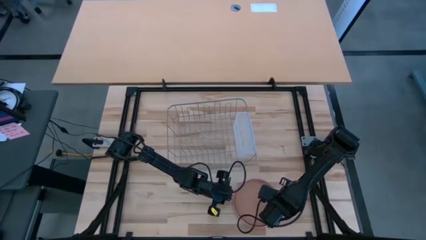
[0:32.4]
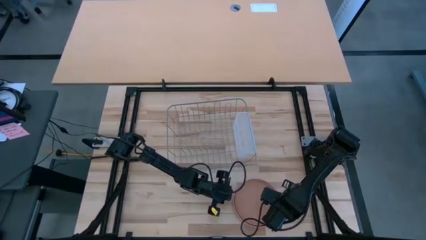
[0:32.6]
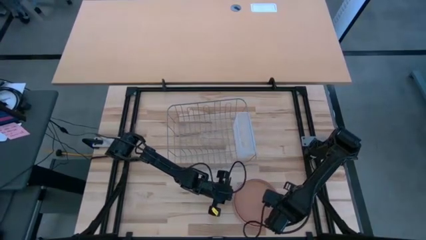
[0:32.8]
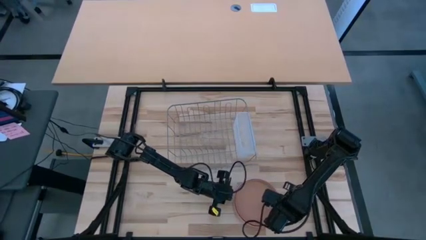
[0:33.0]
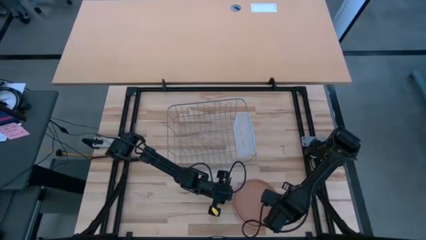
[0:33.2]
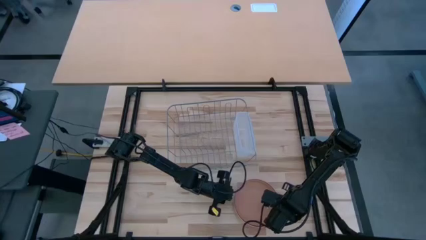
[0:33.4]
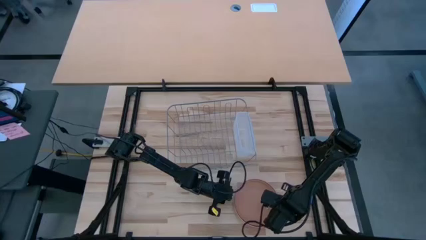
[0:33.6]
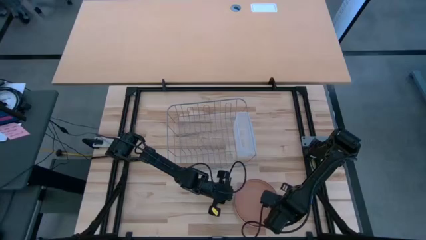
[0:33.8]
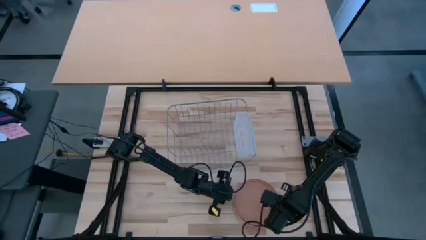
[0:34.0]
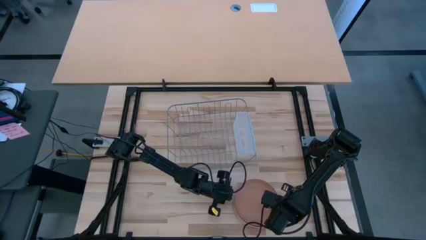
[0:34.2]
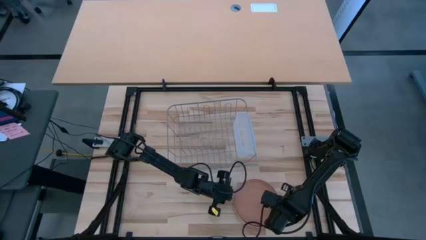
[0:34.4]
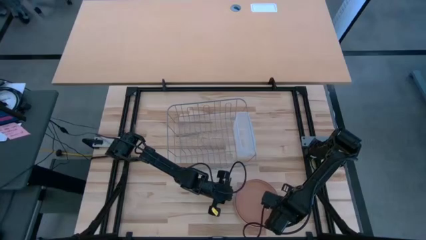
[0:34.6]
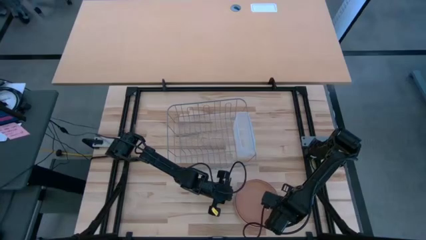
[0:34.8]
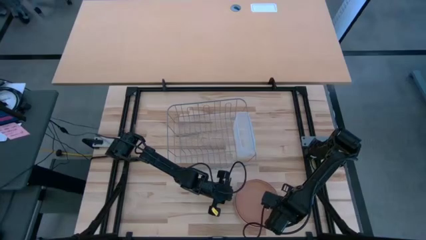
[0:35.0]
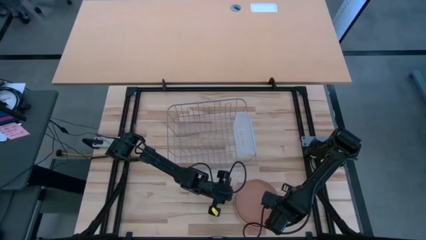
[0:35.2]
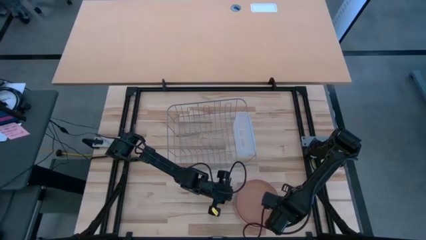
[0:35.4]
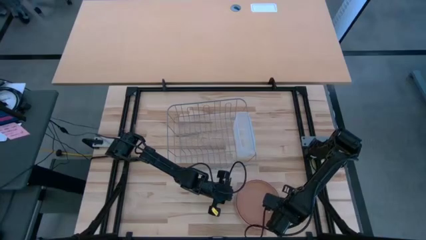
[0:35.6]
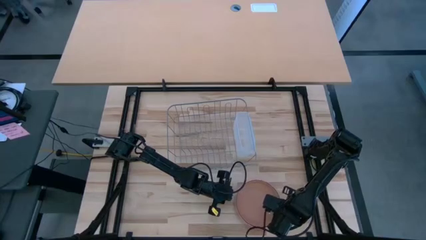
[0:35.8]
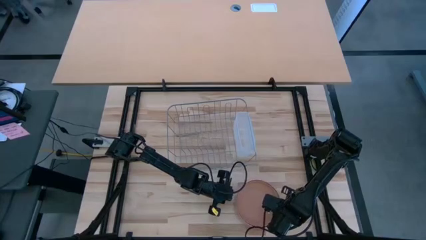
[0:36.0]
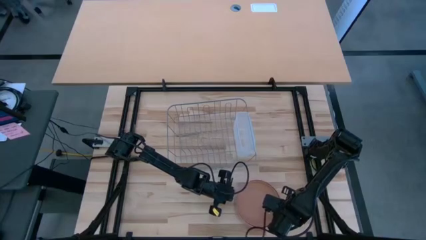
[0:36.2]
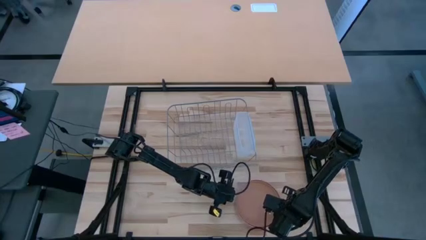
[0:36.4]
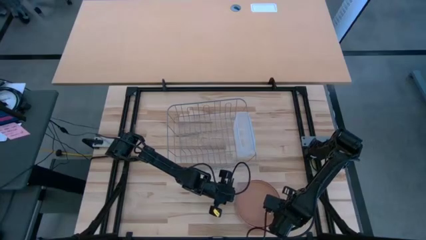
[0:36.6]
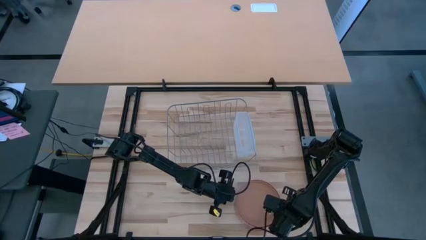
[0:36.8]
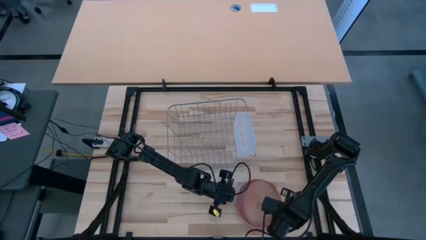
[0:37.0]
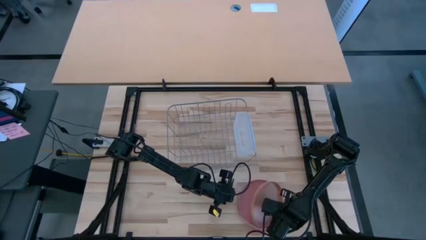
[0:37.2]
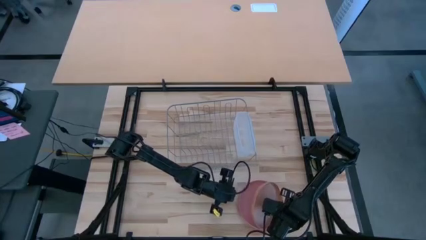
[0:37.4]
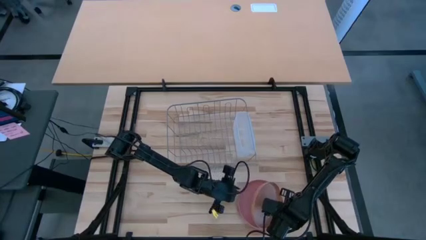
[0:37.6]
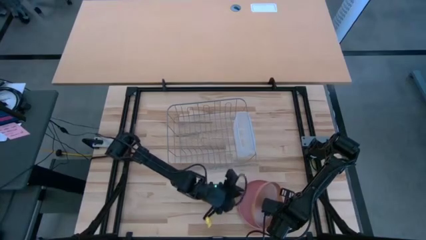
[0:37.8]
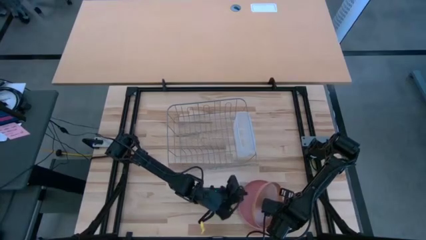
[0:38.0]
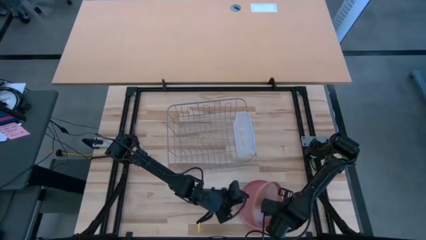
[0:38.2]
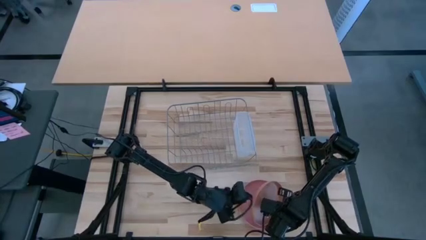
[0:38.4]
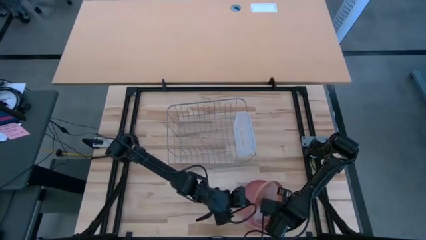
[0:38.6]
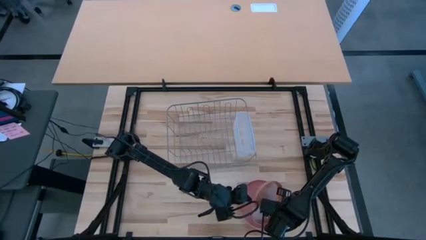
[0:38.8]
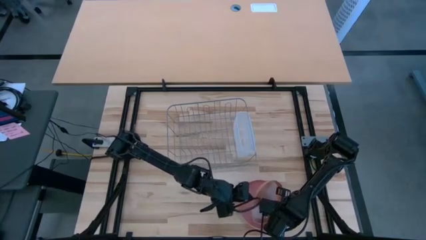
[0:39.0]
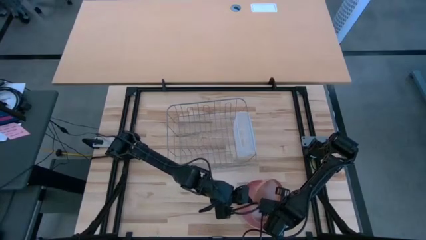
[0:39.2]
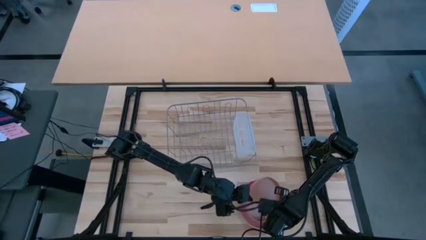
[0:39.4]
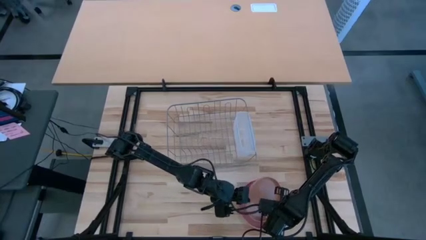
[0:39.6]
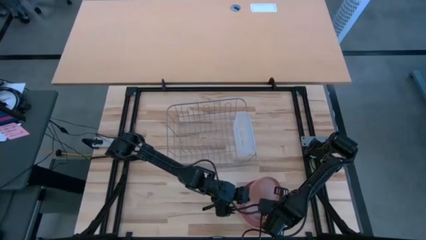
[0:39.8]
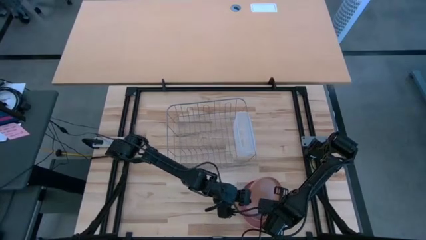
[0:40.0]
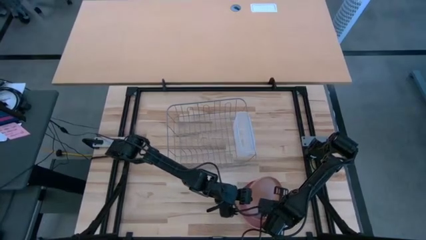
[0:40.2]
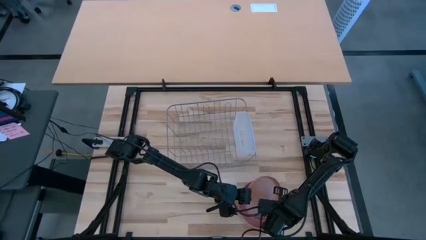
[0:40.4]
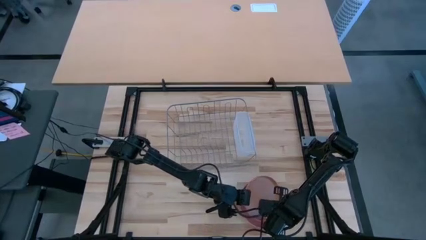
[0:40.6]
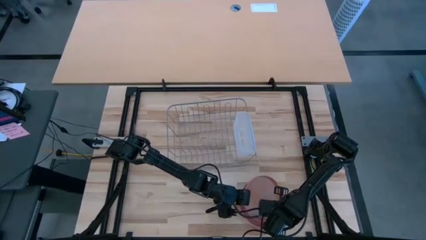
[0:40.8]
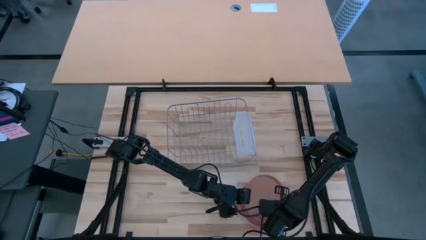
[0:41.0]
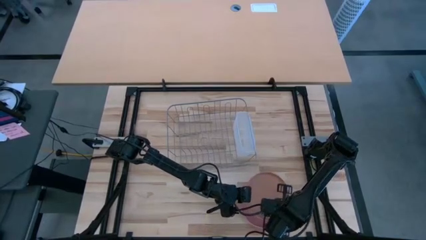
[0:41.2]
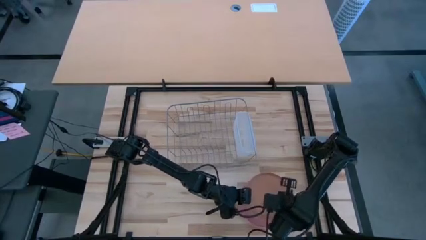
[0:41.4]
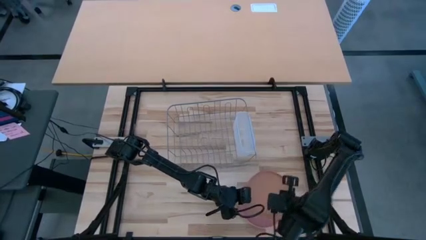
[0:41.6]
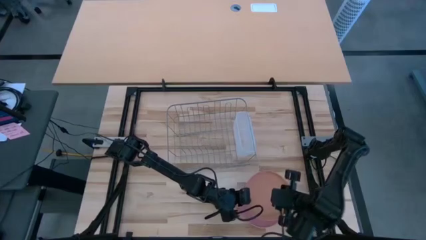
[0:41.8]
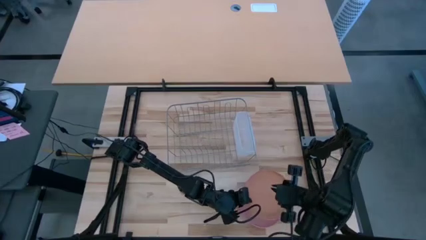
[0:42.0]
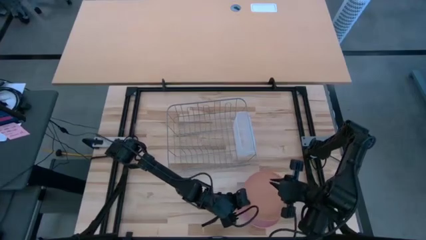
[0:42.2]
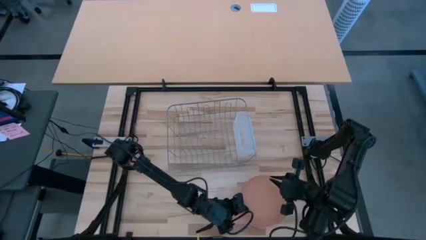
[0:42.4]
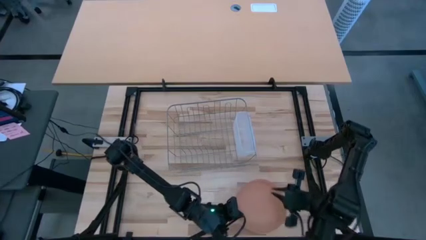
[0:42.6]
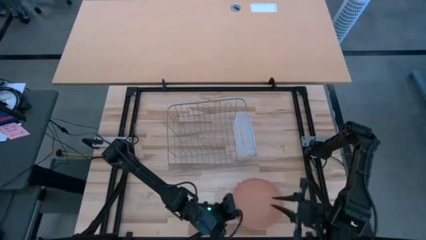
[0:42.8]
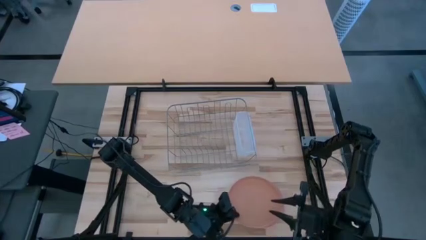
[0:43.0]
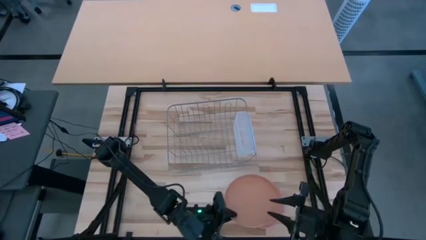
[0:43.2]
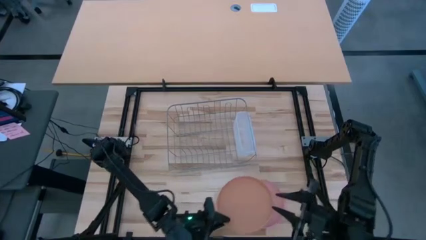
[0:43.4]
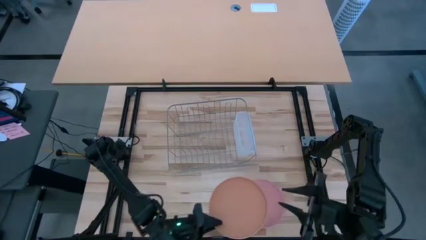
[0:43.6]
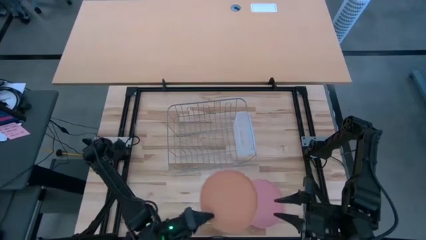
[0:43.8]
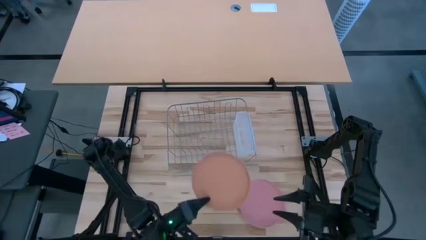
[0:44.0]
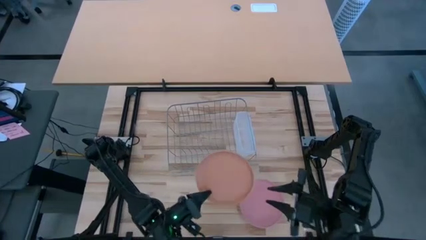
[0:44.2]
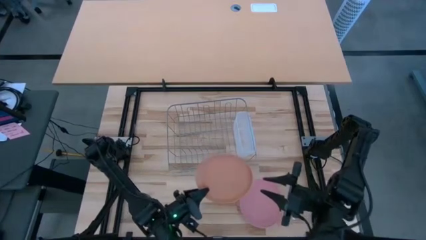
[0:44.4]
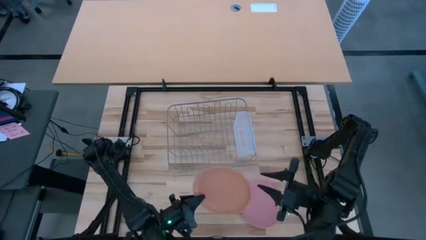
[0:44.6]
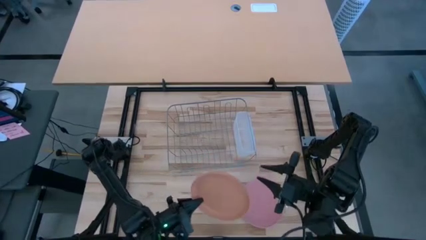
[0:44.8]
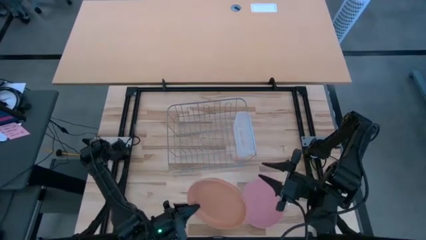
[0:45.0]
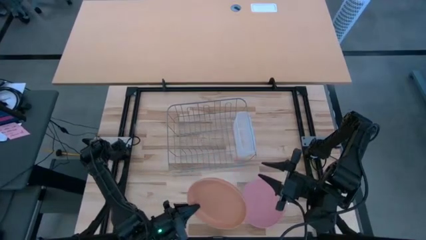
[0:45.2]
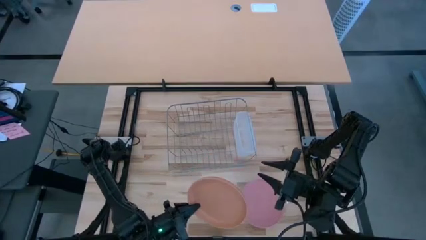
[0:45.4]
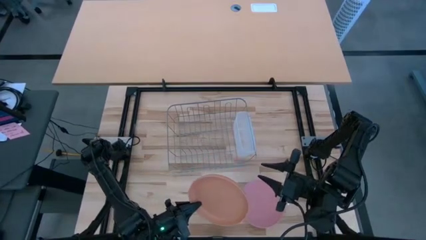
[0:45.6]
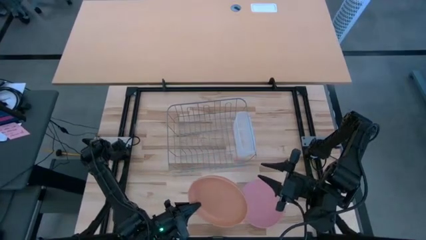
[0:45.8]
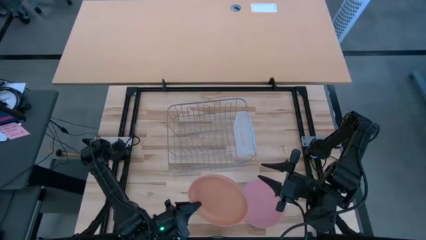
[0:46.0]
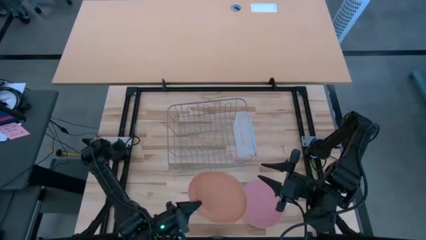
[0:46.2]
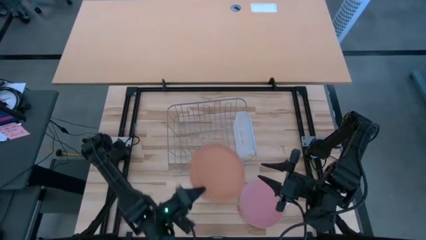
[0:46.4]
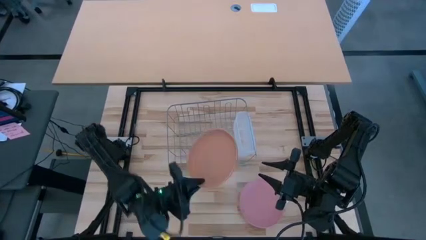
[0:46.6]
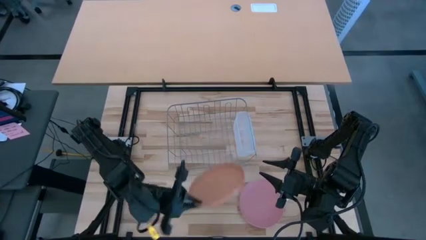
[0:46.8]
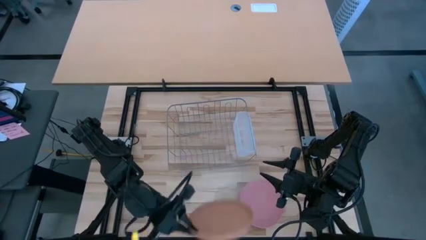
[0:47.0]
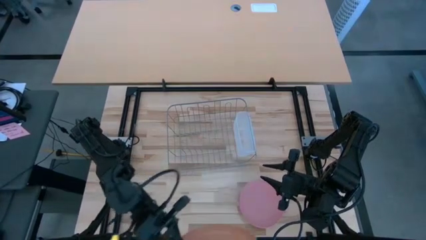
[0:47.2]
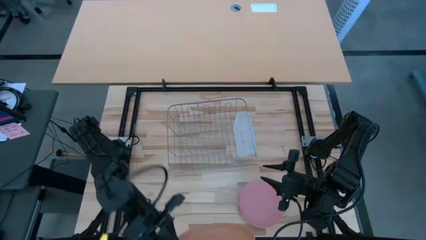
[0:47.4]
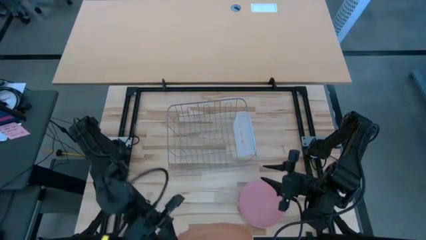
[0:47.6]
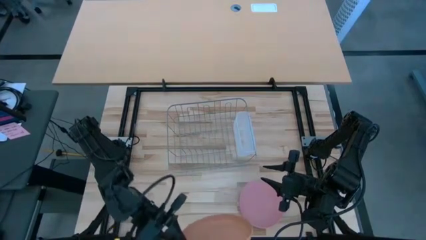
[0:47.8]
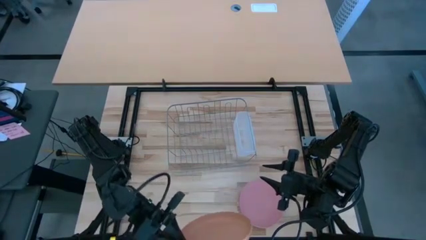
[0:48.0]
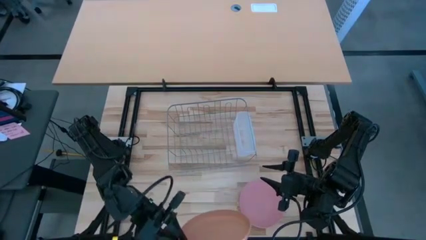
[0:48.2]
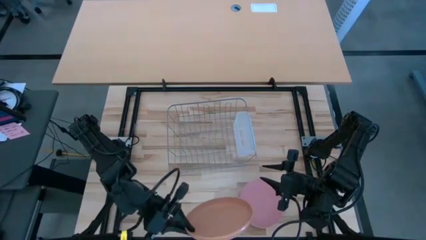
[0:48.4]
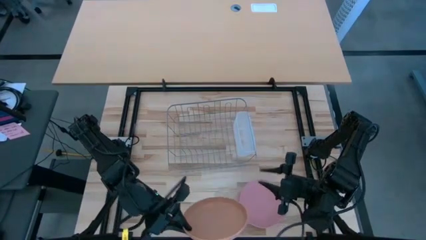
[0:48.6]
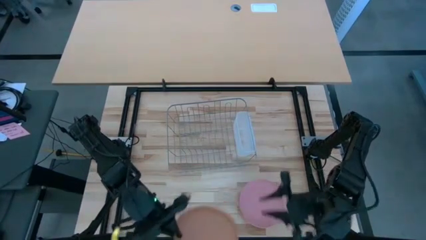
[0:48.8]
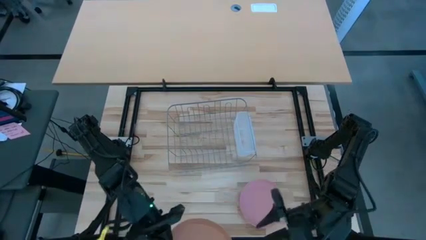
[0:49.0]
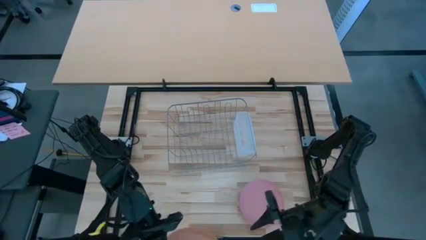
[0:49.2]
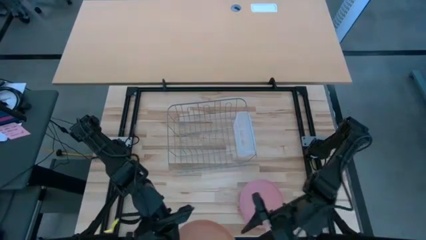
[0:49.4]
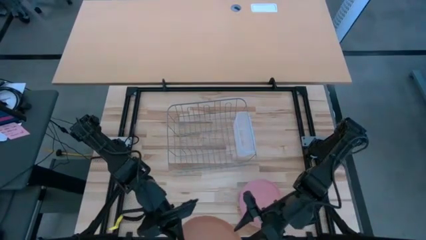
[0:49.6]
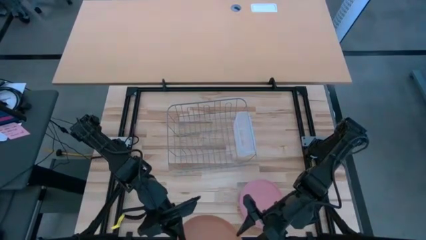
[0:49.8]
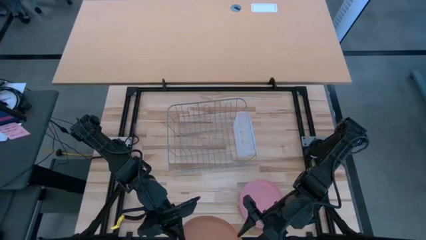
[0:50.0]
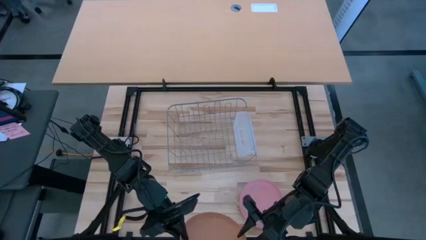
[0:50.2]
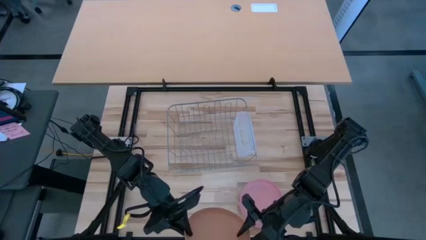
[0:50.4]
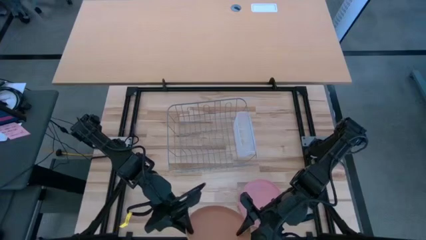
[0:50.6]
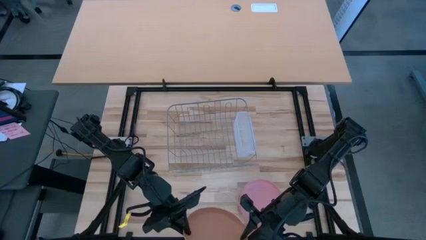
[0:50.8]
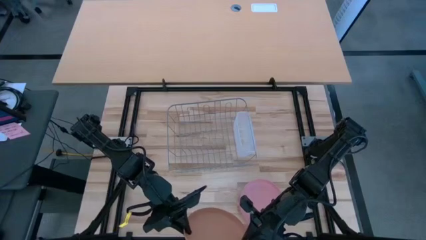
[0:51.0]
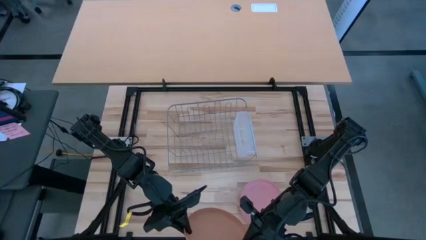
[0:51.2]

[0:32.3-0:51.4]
Task: Sort dishes
Put the brown plate in the dish rack
